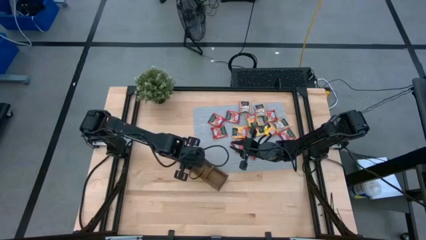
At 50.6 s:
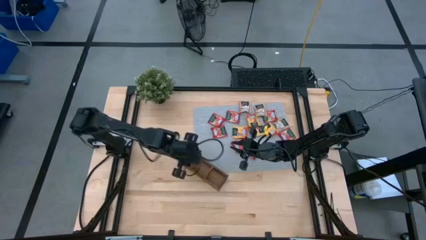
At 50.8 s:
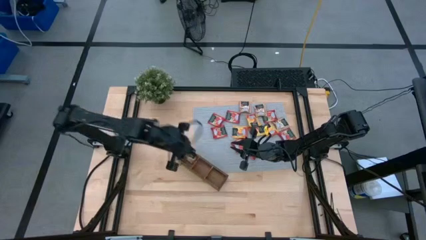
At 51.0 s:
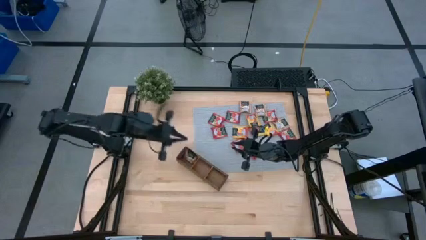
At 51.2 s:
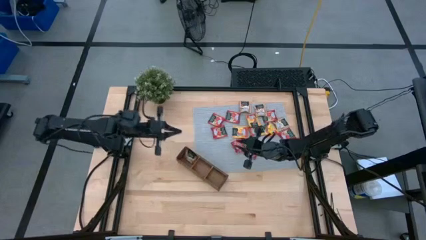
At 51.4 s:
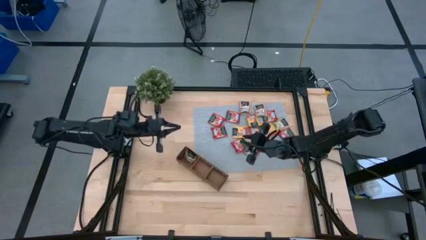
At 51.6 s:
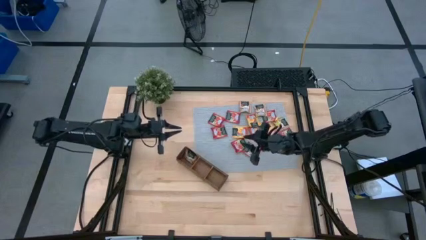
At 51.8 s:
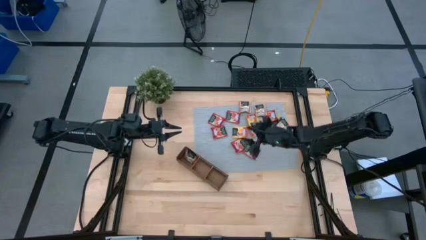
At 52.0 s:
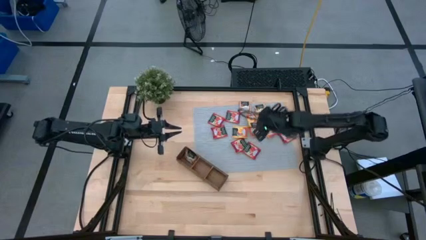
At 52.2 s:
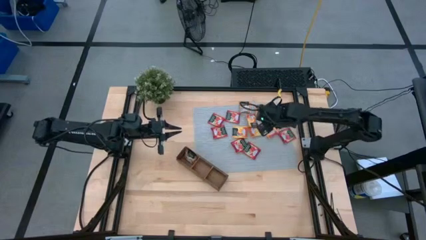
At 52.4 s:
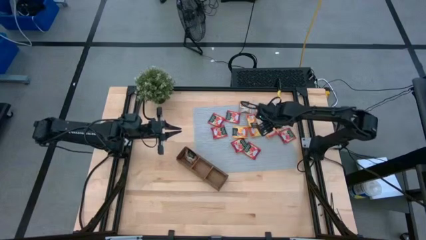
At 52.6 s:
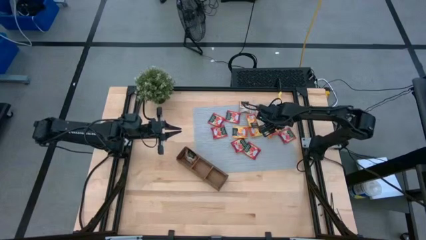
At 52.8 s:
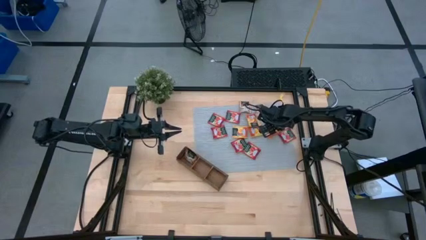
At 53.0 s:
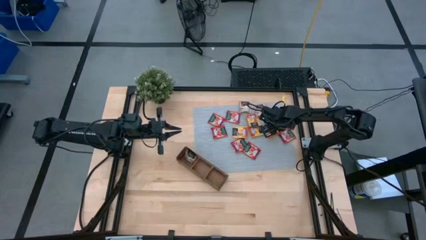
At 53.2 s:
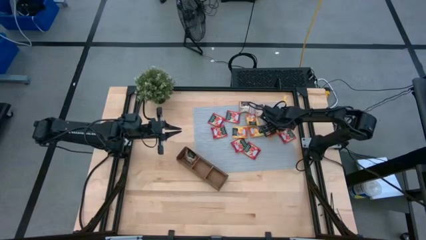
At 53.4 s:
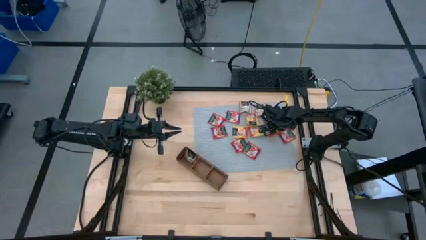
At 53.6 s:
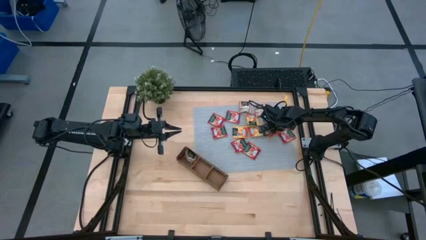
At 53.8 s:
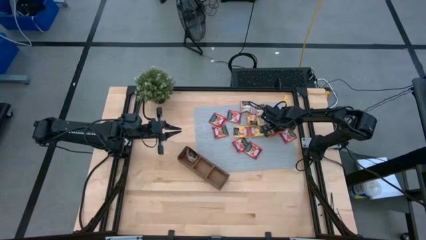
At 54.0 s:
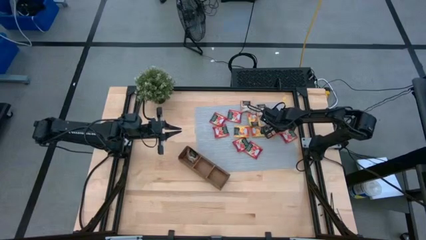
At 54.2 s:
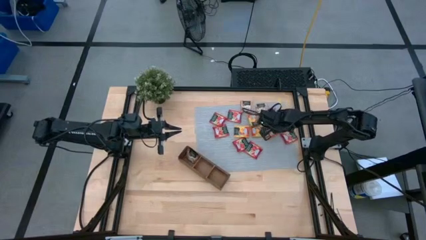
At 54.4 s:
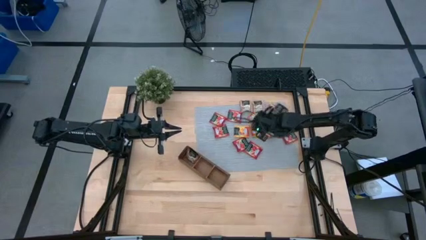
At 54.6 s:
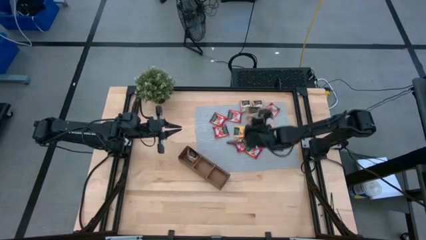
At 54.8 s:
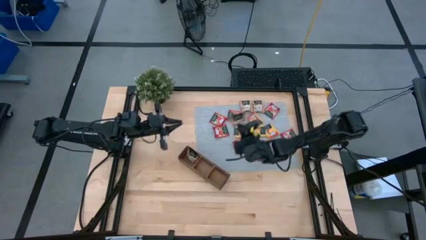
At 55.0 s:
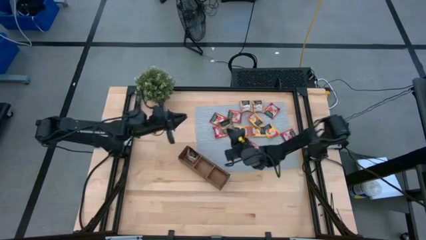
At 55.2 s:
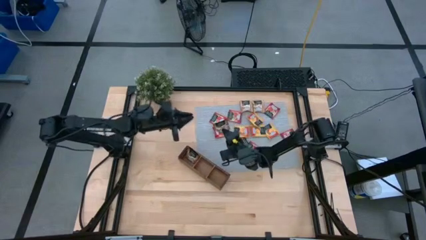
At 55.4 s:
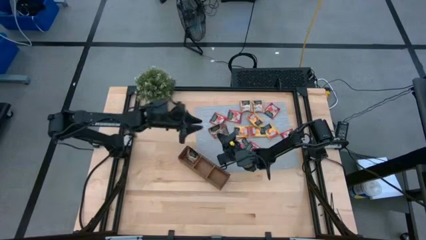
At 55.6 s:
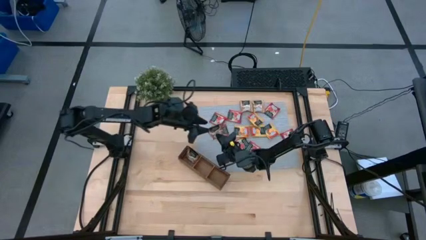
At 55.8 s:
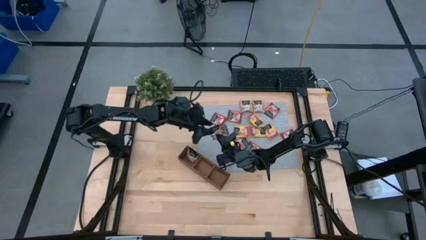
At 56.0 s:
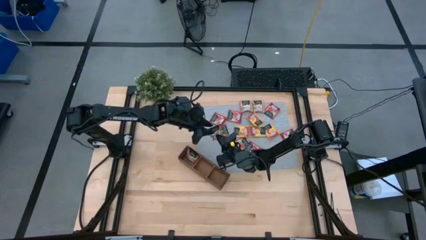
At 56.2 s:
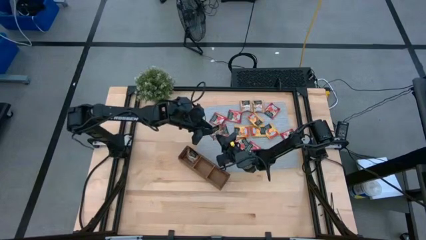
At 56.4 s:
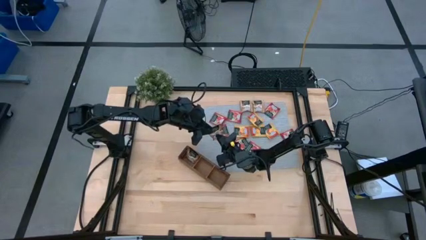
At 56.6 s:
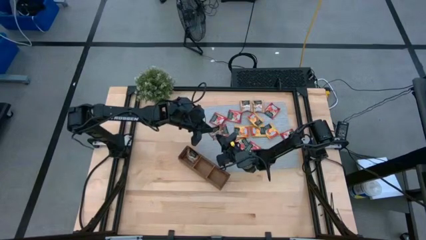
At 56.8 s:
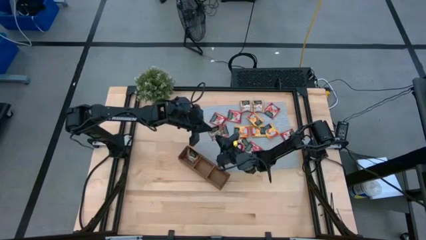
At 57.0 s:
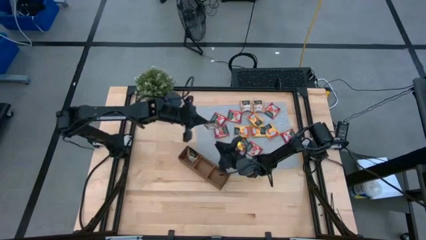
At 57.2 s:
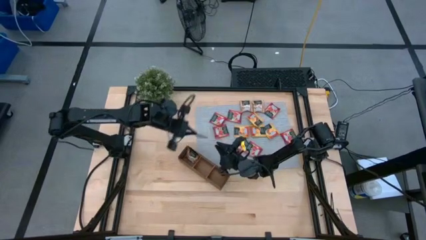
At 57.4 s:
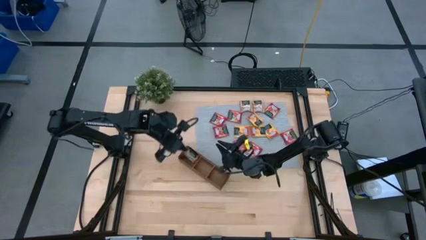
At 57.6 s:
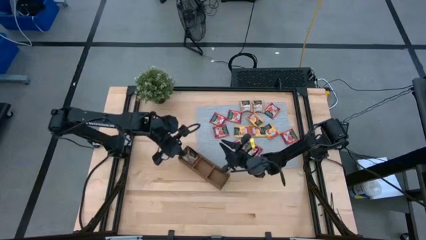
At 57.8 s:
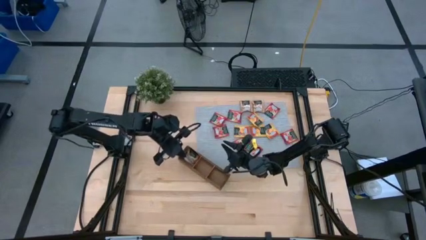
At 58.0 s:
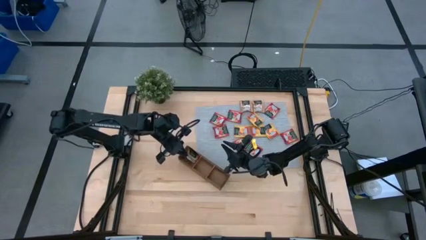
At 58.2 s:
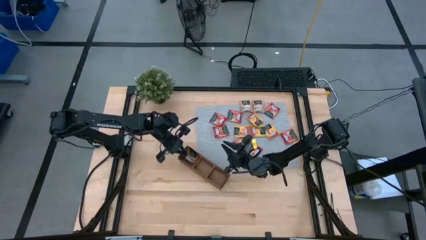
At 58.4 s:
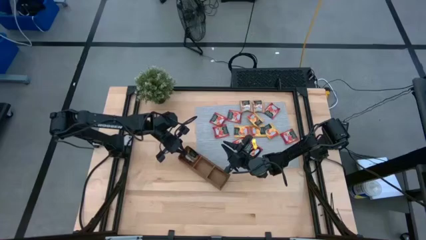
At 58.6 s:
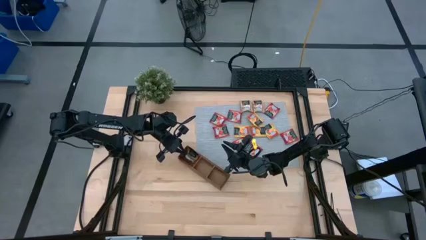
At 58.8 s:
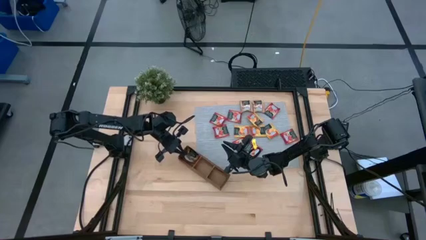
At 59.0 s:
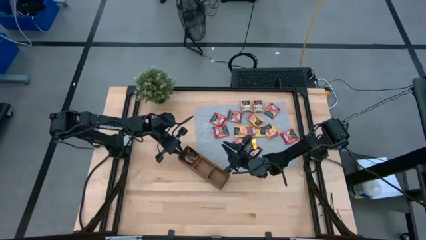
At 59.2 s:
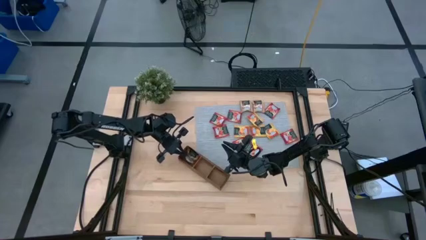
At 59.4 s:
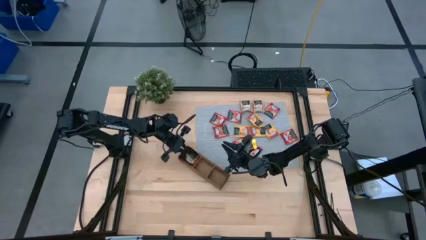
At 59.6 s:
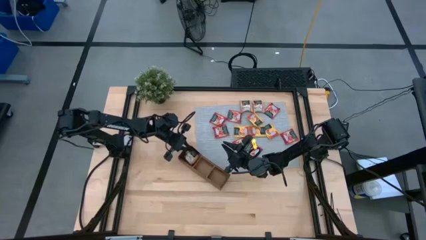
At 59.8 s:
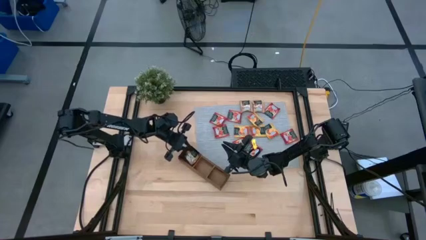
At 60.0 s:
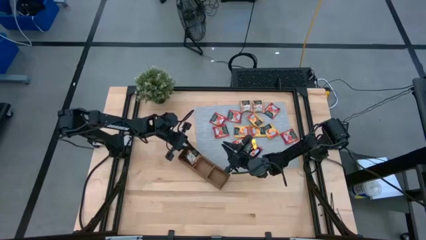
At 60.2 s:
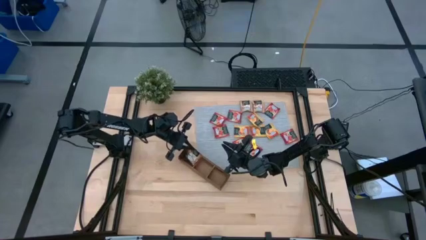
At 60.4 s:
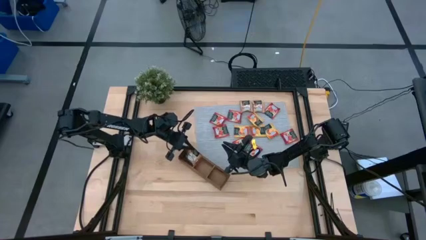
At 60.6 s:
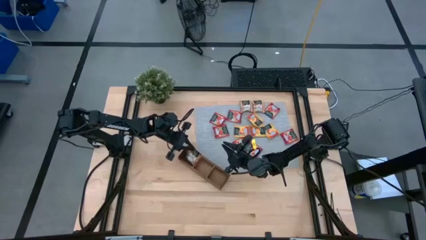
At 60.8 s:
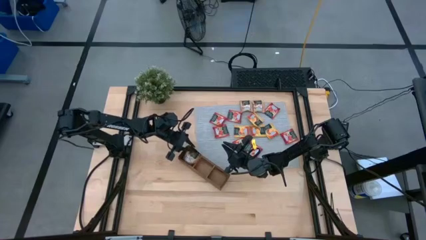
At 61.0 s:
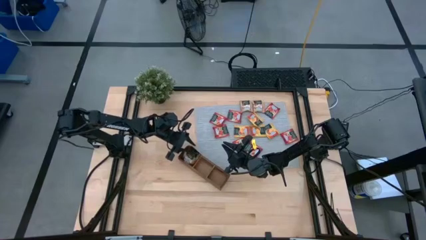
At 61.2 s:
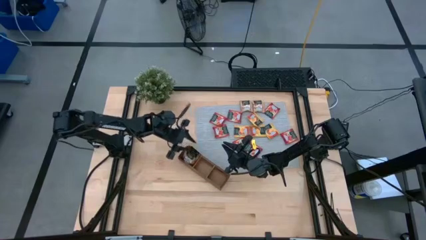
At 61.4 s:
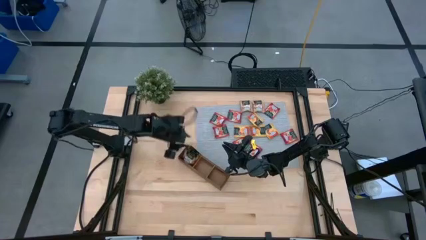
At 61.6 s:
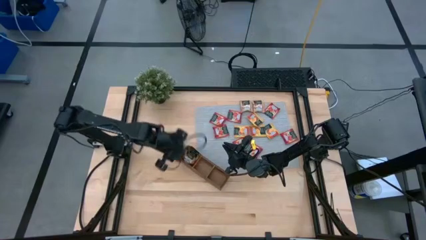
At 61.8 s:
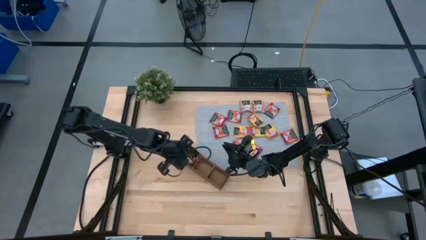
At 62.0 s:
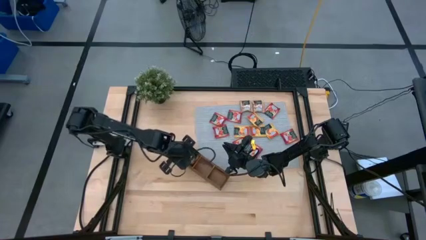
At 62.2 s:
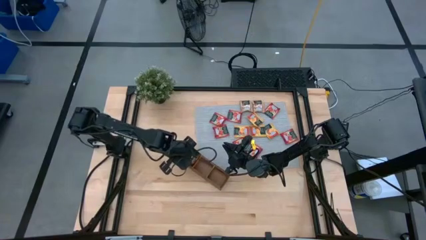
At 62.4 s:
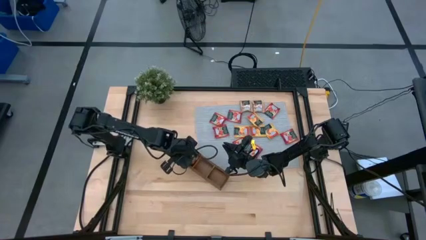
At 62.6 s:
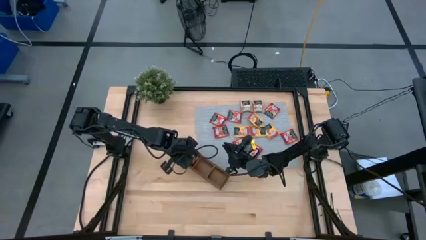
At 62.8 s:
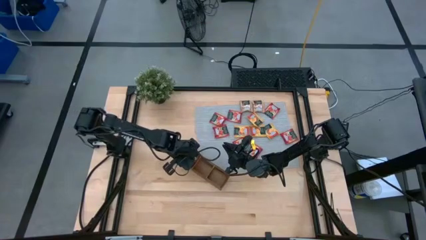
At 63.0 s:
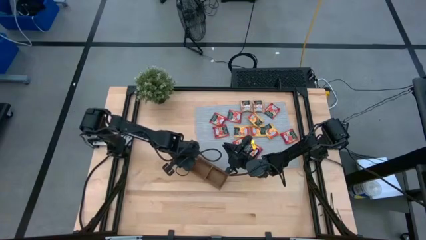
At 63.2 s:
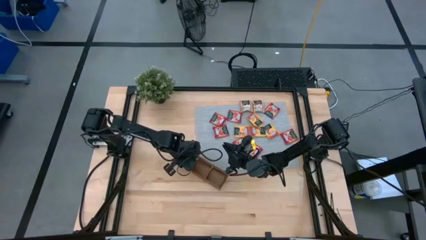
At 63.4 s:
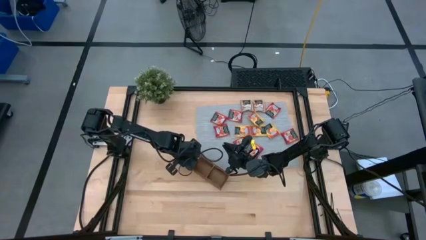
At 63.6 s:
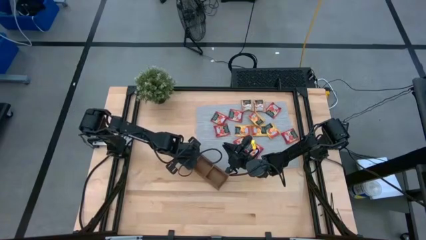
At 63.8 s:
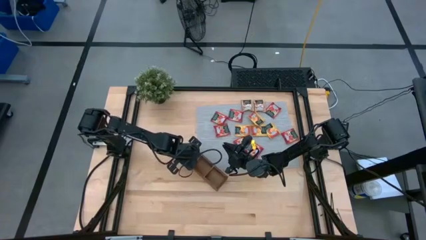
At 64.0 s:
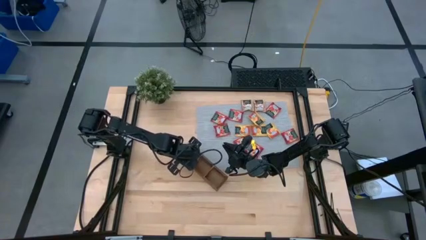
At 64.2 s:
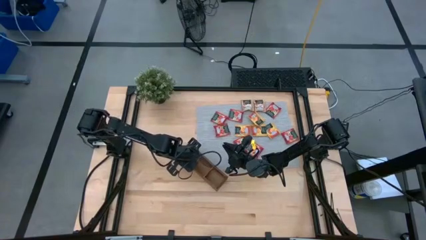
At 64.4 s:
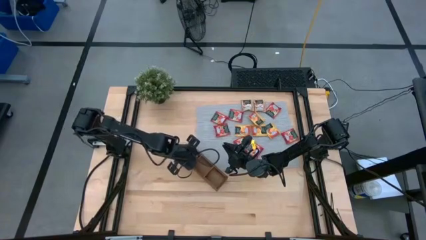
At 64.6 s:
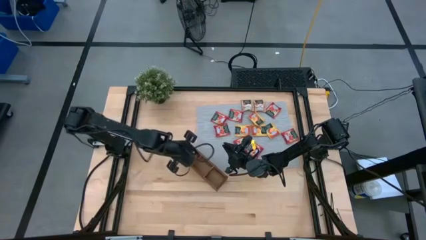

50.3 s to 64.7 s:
Task: Pick & Place Tea
Put the brown tea bag into the left section of the wooden organizer
